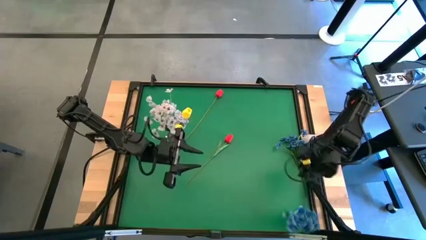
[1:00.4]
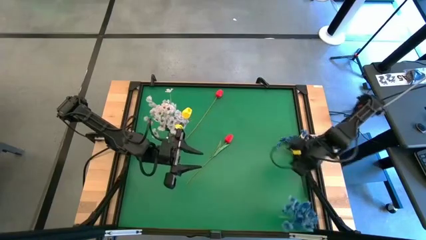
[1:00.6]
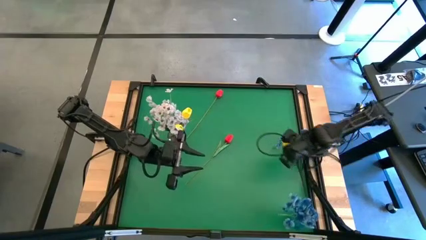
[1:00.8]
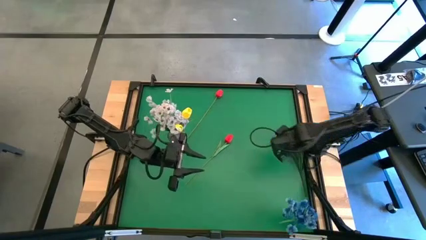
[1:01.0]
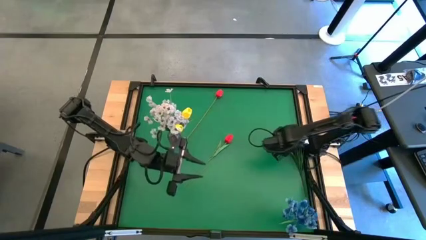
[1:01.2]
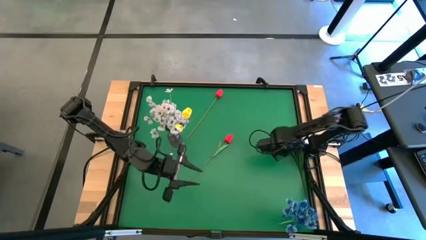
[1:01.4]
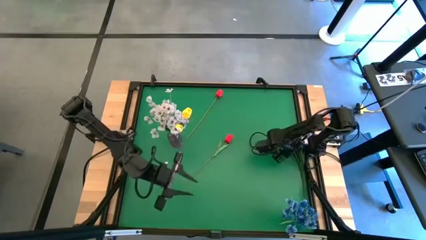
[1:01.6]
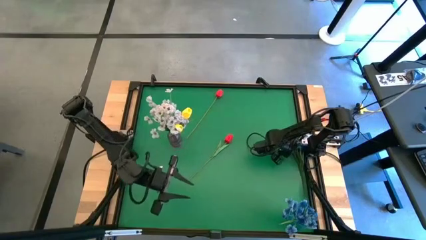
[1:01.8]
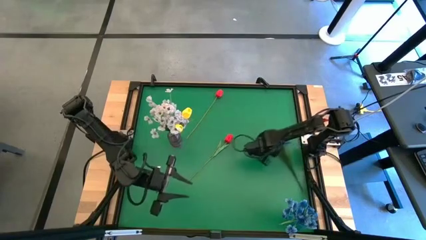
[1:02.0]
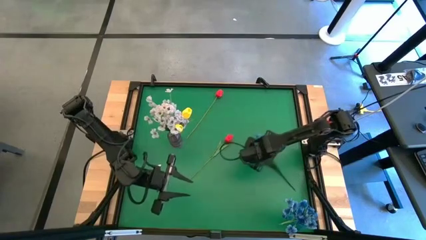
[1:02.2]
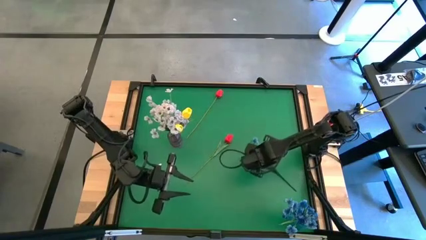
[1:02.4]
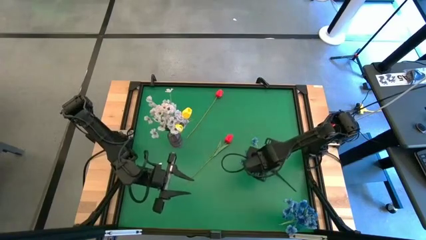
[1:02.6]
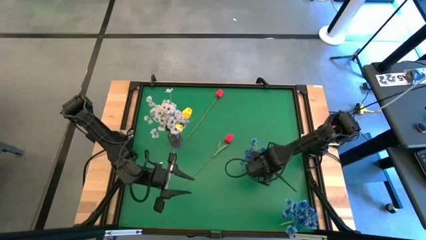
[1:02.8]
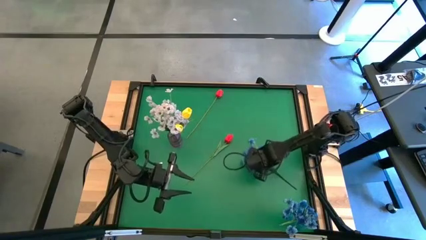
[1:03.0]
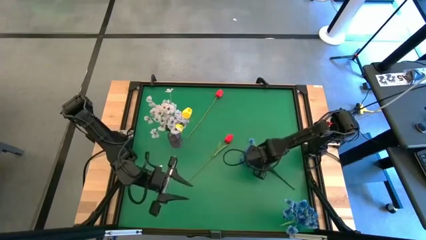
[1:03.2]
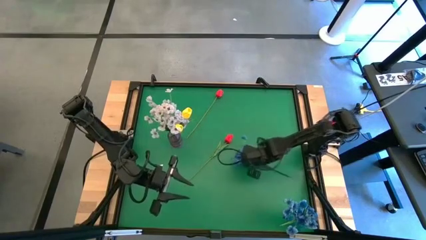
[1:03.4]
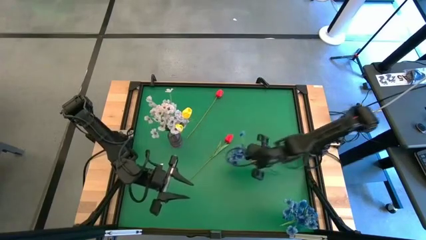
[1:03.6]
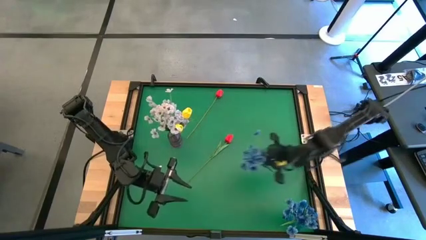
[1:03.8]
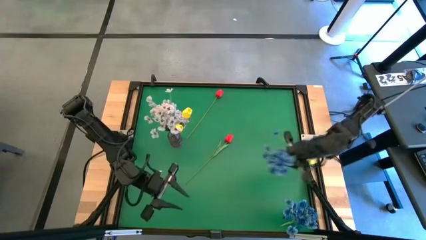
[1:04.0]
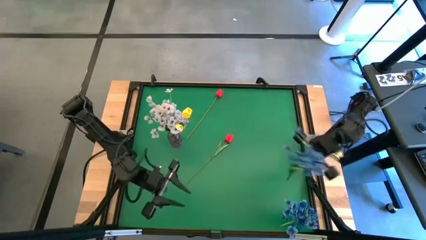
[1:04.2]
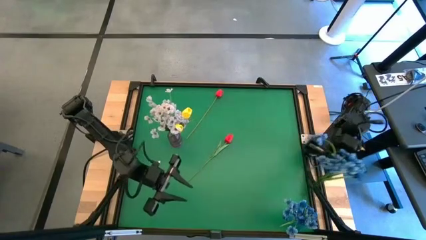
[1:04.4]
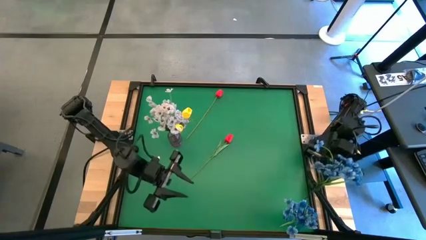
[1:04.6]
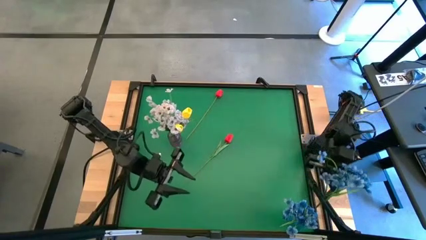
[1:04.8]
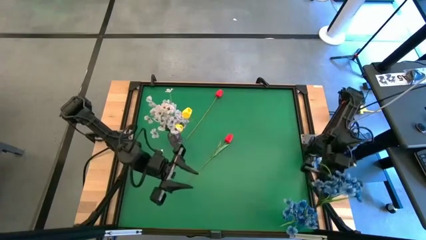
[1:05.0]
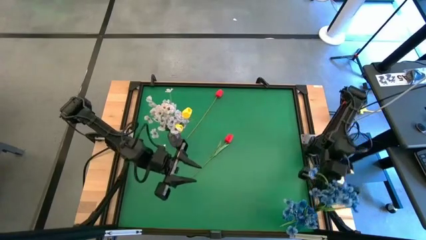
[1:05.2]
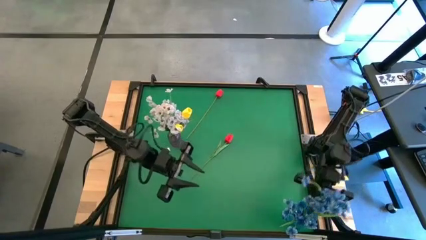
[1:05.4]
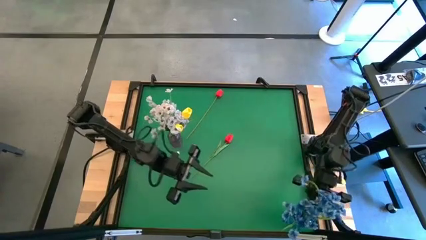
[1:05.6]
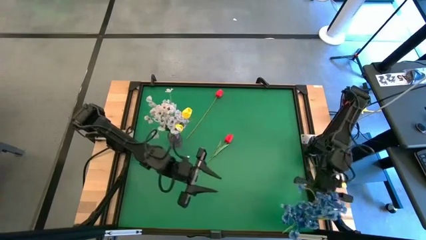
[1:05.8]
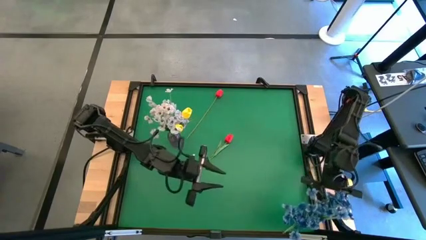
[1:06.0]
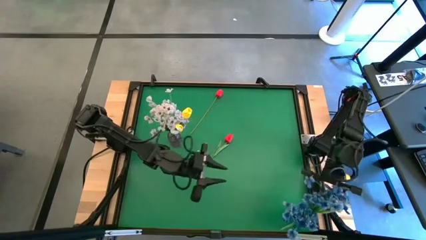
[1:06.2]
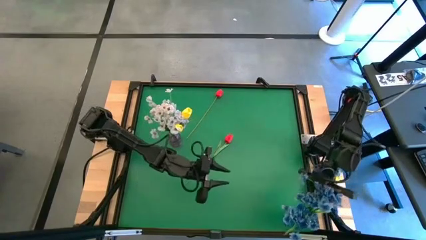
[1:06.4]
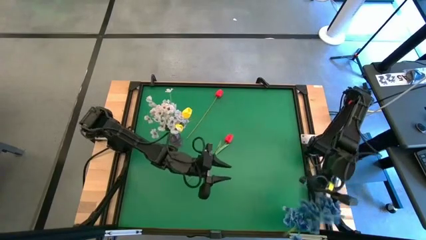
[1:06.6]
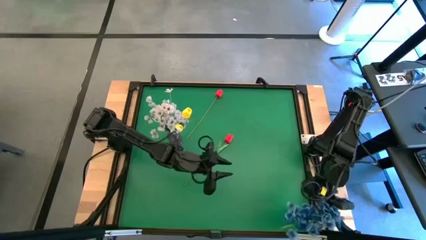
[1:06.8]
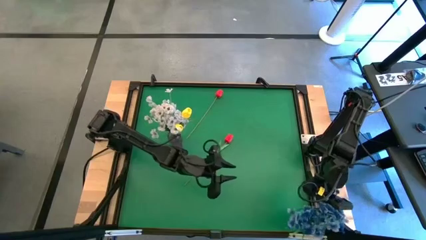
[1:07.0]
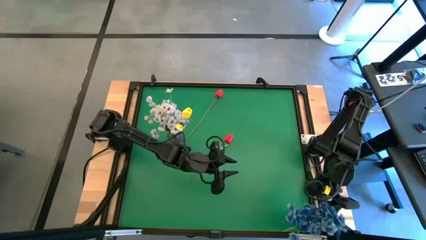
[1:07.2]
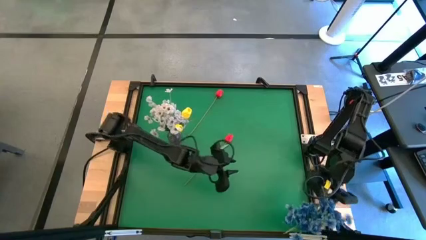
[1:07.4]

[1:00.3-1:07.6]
Task: Sort flowers into vase by color
Put the blue flower into the blue vase

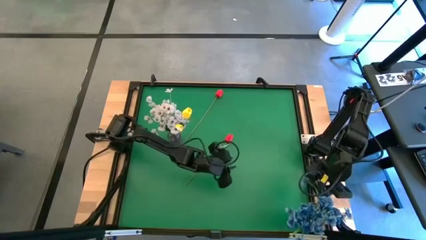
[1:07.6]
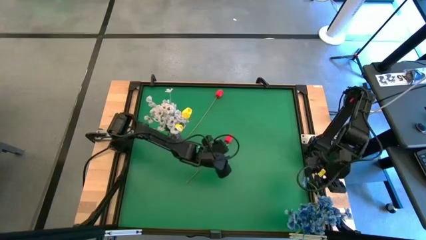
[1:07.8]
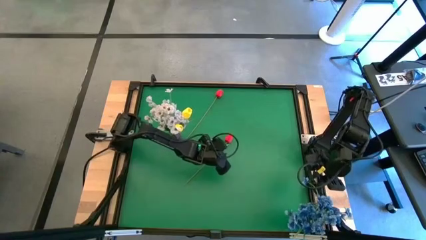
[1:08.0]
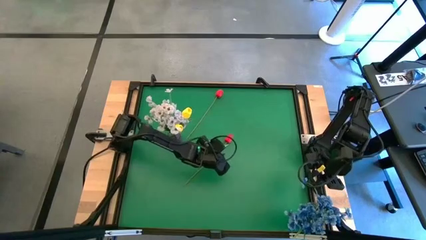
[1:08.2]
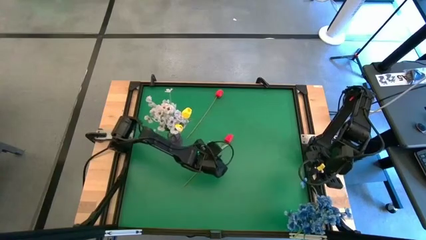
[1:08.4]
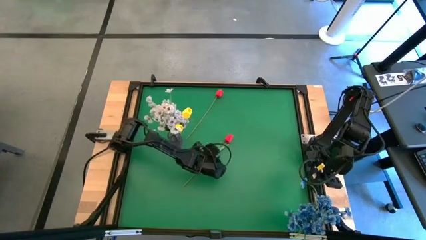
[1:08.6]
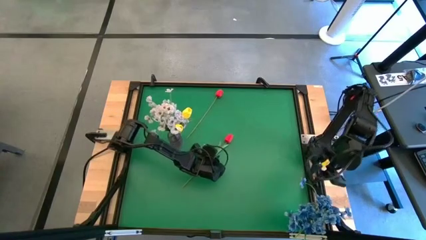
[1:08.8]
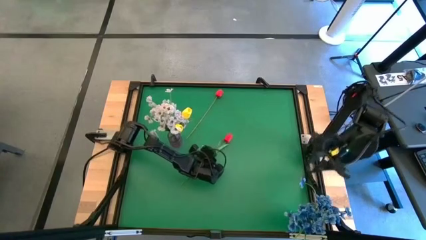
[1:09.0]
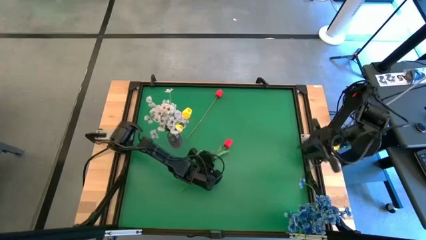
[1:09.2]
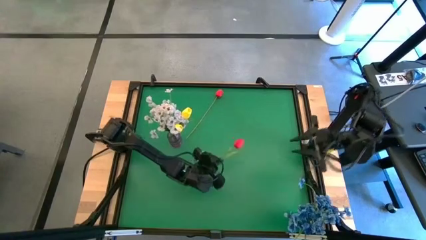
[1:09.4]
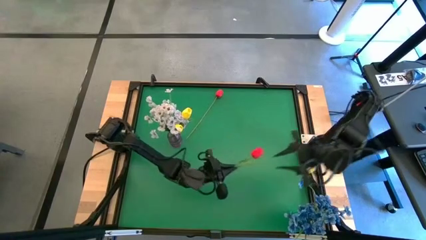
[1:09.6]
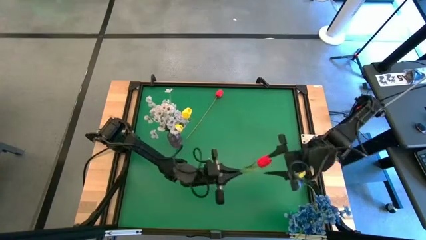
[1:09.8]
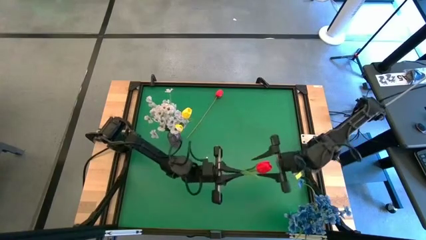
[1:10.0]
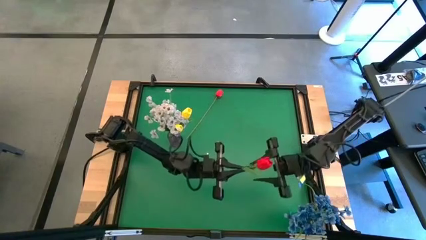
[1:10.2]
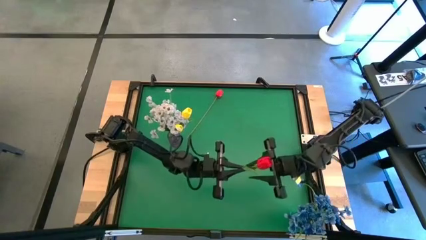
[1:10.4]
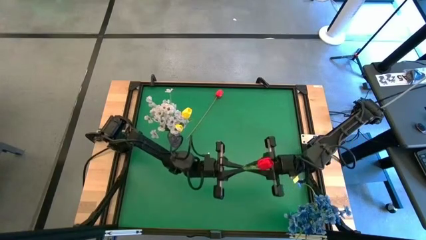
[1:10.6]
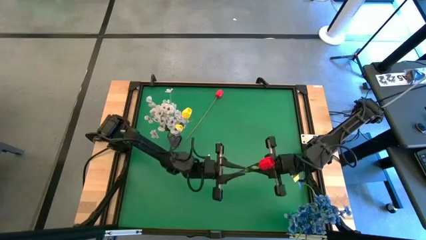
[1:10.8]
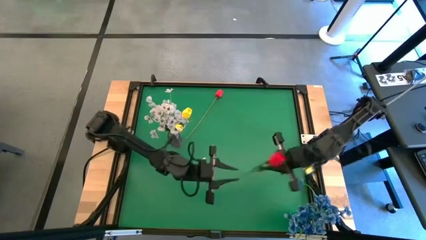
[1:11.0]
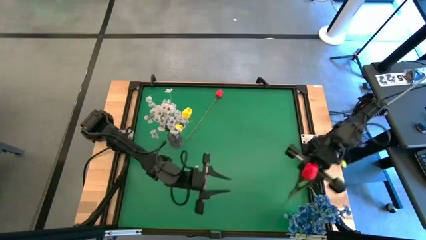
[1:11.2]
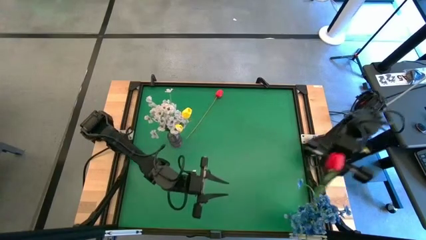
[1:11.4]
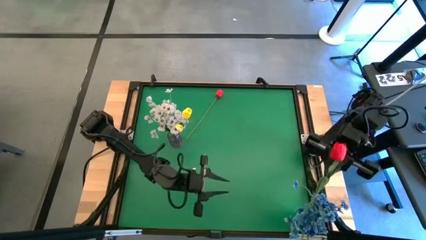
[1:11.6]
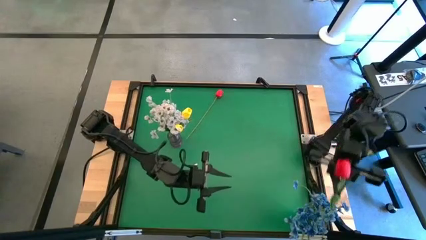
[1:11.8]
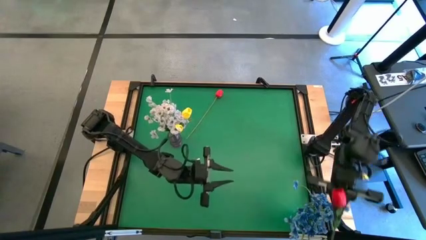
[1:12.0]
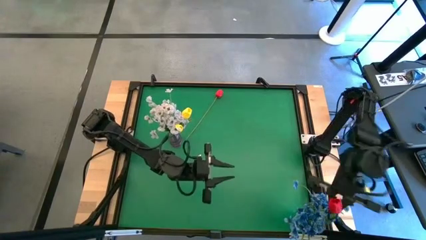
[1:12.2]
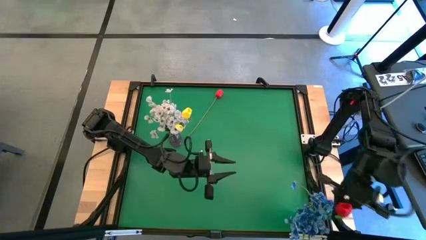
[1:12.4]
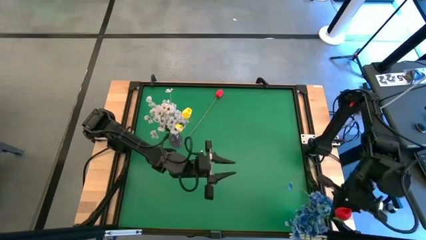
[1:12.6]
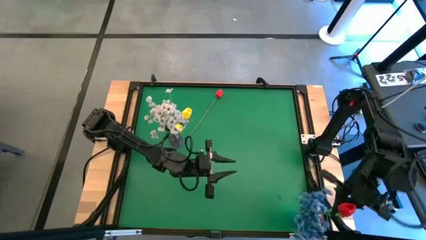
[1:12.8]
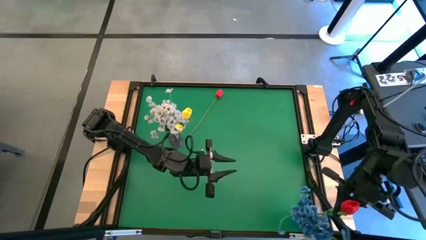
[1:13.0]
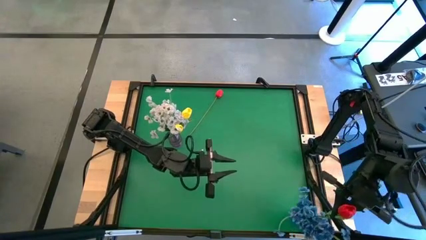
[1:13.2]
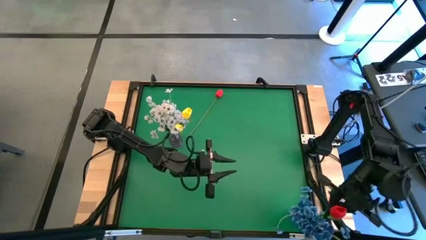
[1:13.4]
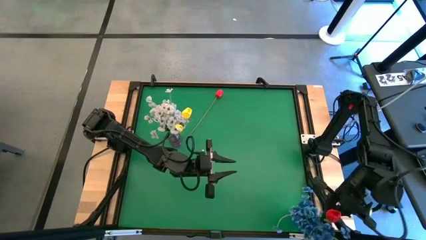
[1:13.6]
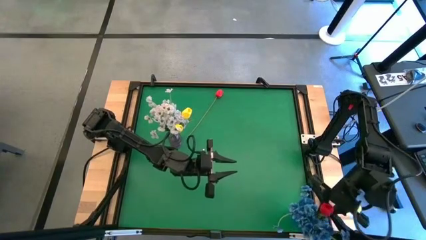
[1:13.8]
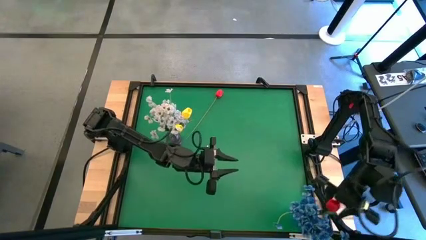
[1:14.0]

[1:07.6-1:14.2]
Put the bottom red flower into the blue vase

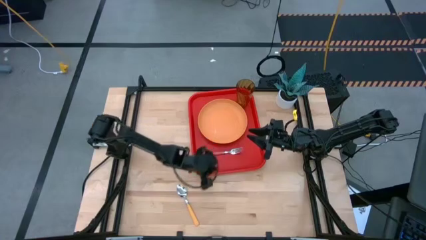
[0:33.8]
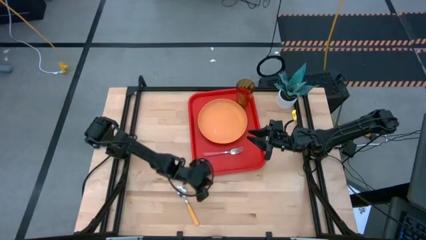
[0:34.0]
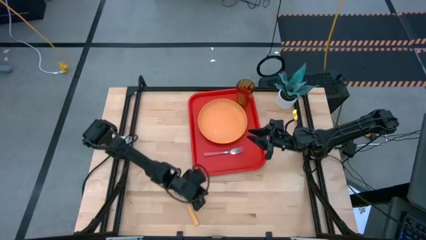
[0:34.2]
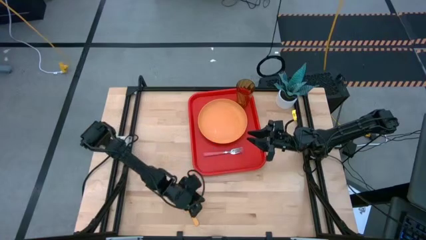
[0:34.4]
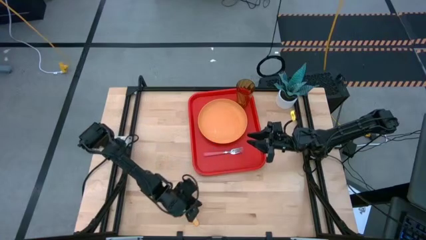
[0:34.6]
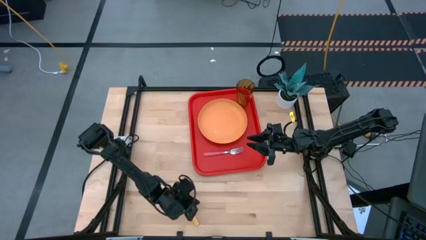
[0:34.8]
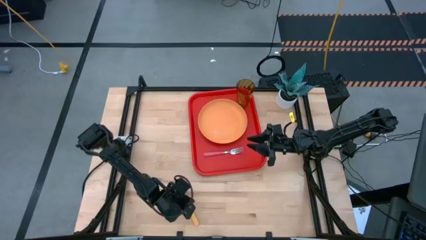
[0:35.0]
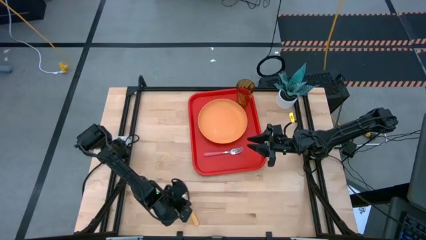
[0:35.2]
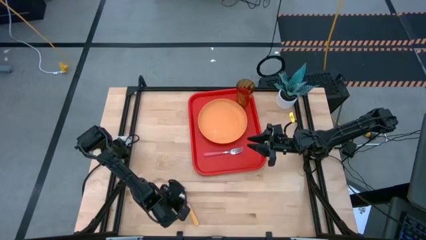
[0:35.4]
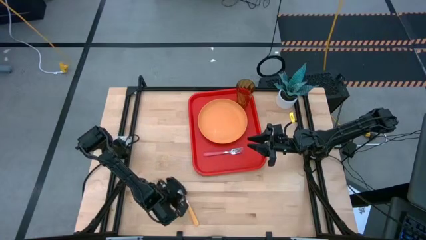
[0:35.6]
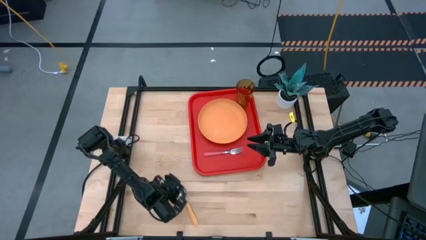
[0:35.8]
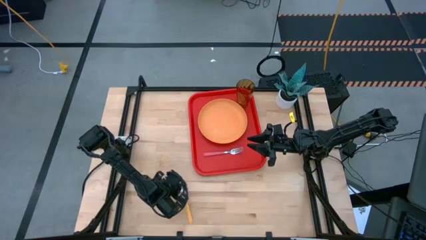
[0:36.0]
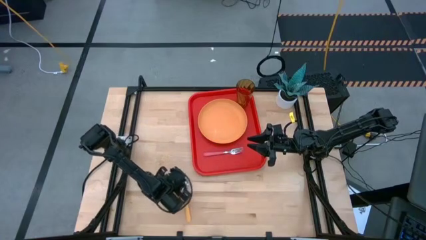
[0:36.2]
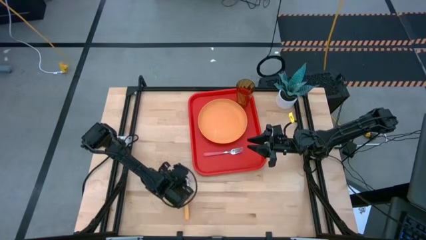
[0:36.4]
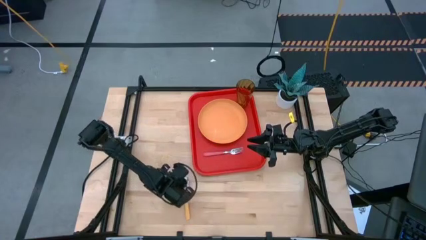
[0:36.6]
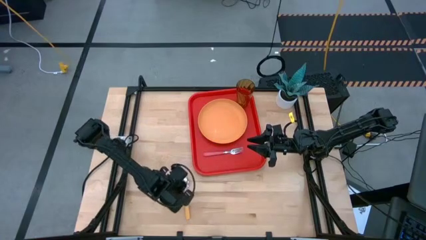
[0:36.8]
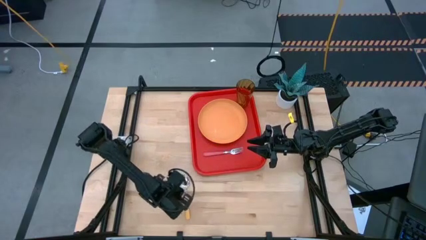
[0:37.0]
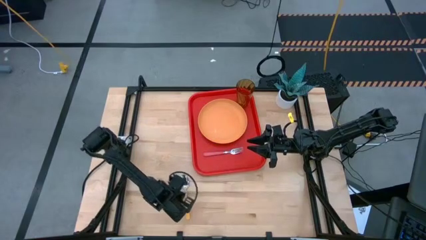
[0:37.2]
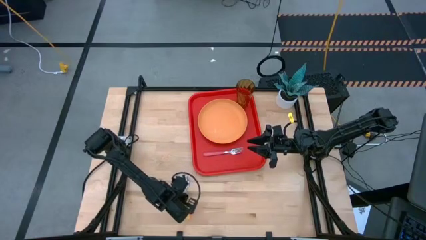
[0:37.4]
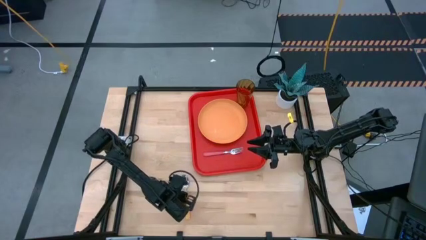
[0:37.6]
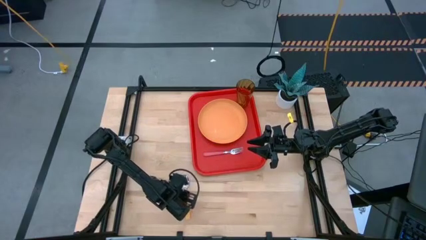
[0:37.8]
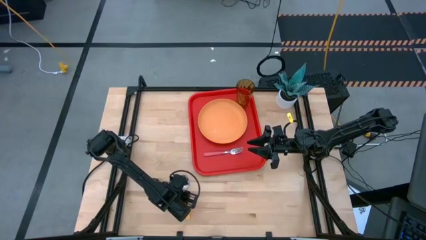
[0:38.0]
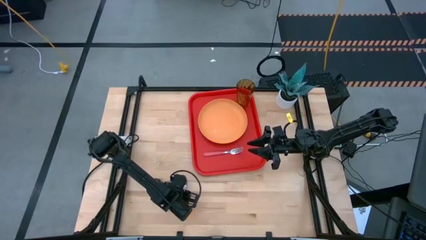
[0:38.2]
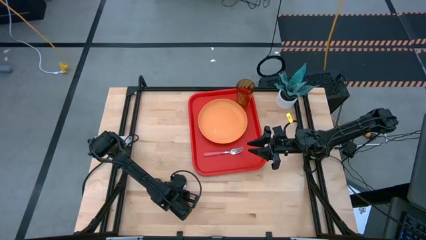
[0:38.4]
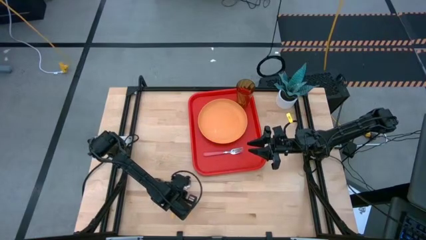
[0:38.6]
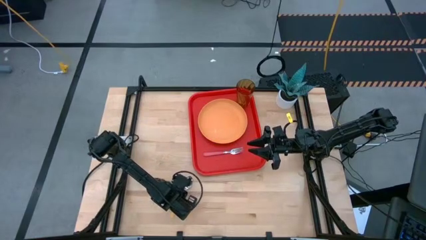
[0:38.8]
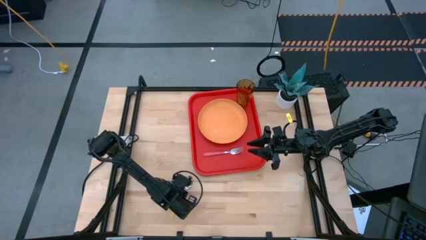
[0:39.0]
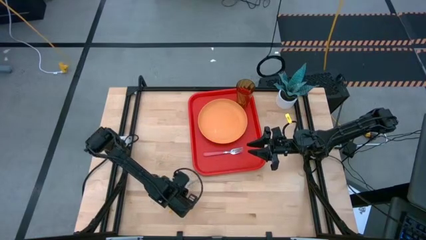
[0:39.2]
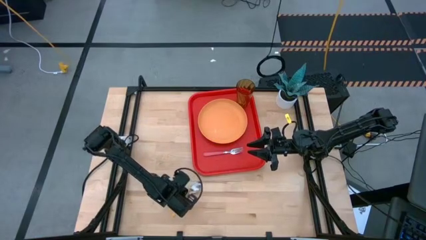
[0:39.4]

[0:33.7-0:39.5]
Task: Pick and place plate/cup/fork/spoon on tray
Put the yellow spoon on the red serving tray to the bottom of the pink fork
